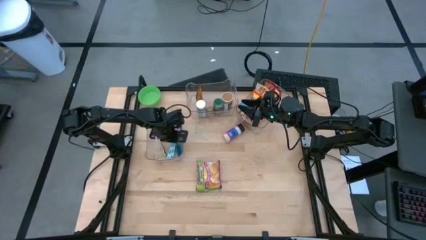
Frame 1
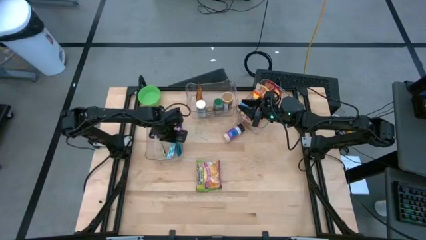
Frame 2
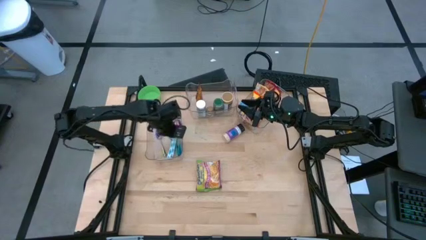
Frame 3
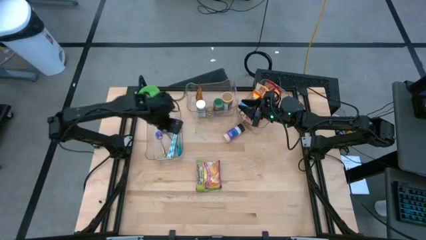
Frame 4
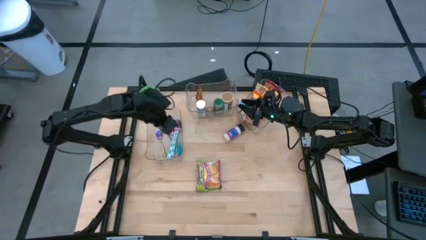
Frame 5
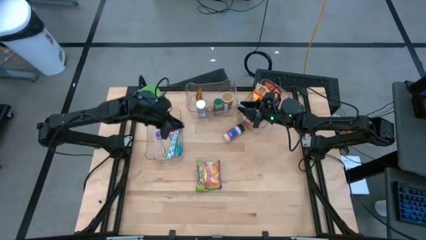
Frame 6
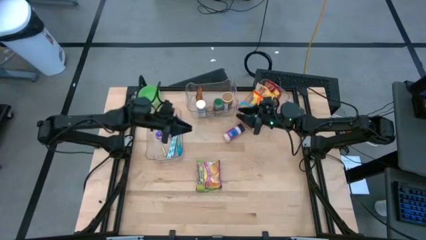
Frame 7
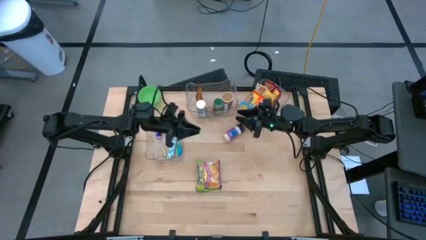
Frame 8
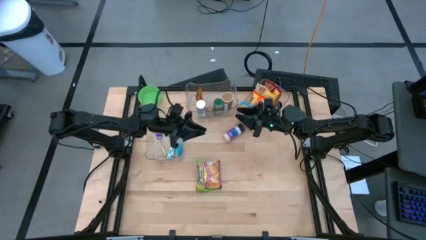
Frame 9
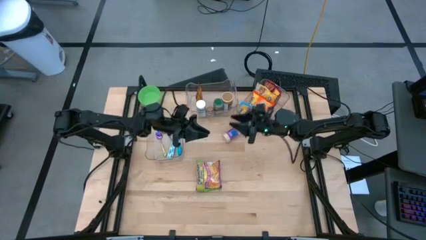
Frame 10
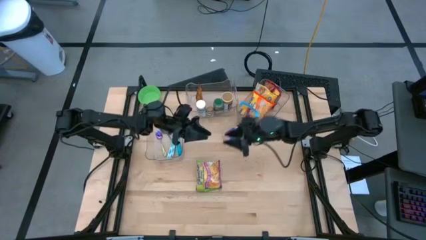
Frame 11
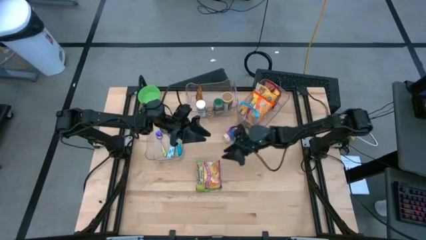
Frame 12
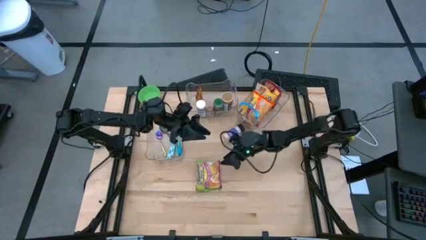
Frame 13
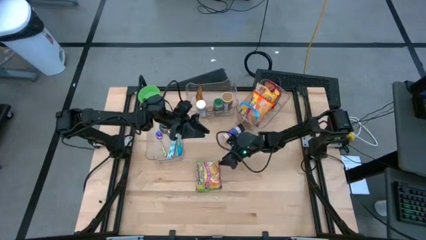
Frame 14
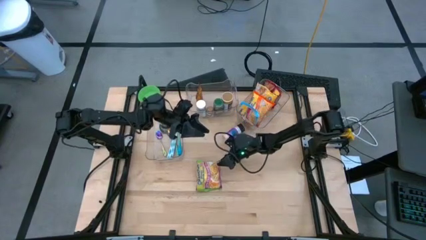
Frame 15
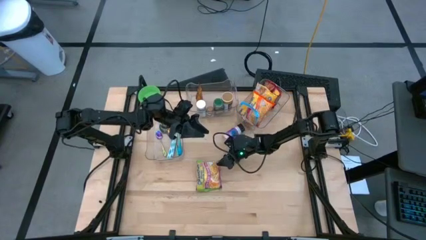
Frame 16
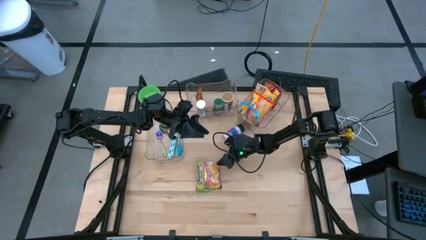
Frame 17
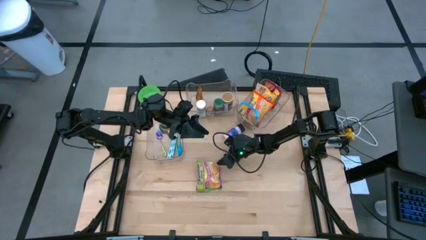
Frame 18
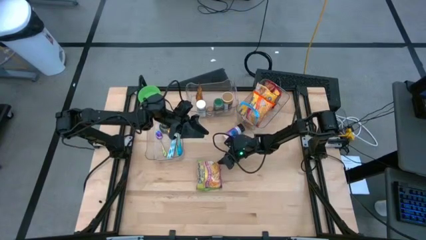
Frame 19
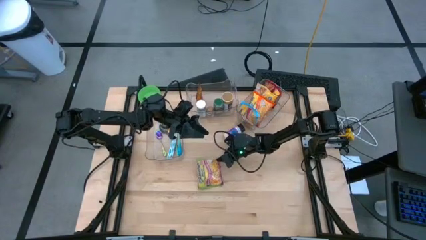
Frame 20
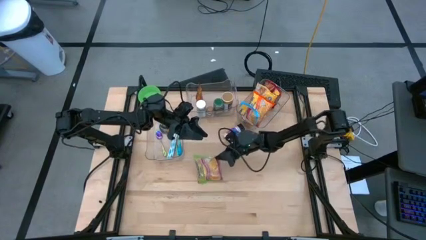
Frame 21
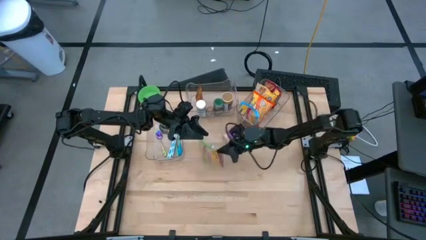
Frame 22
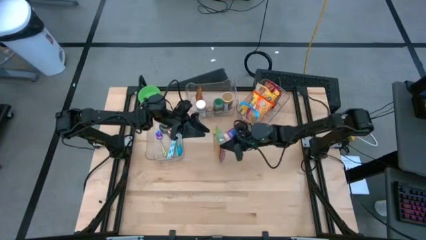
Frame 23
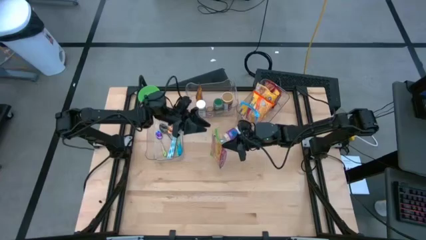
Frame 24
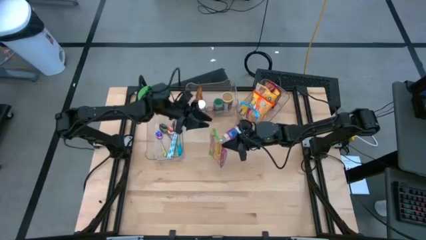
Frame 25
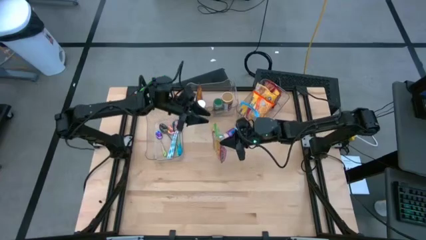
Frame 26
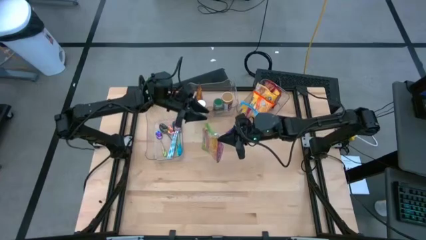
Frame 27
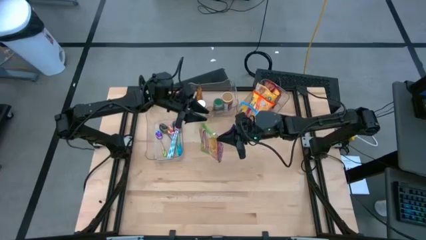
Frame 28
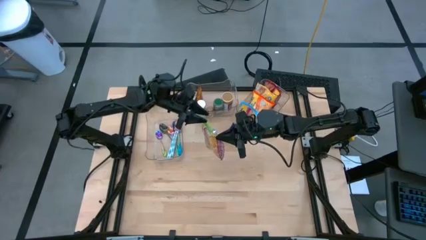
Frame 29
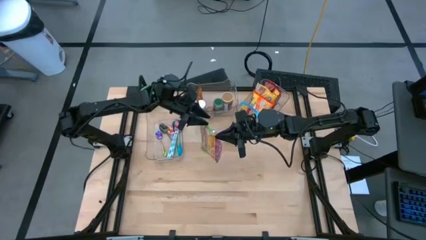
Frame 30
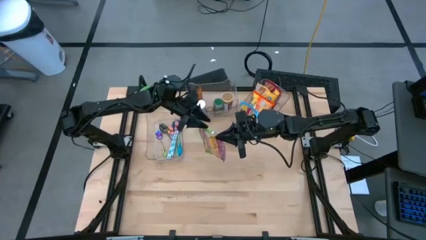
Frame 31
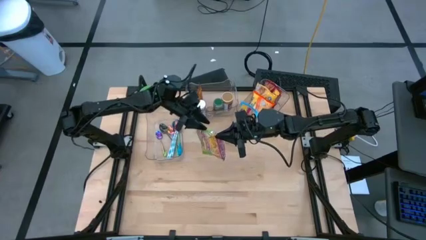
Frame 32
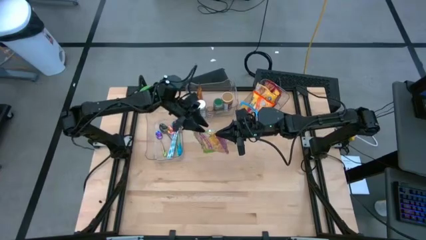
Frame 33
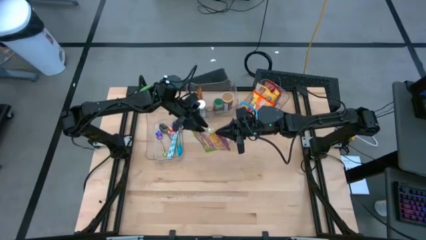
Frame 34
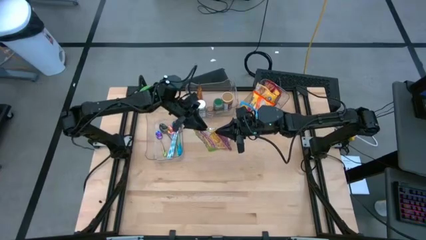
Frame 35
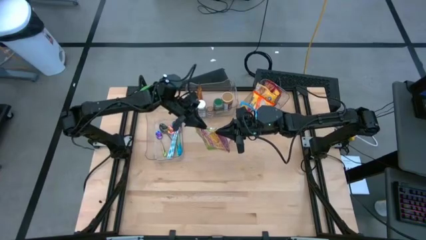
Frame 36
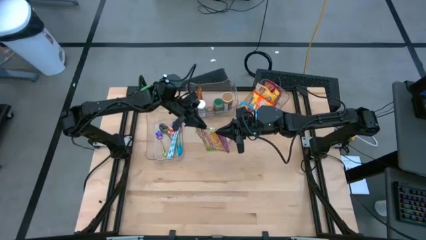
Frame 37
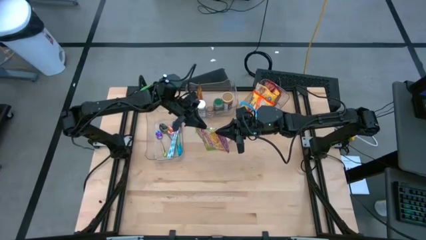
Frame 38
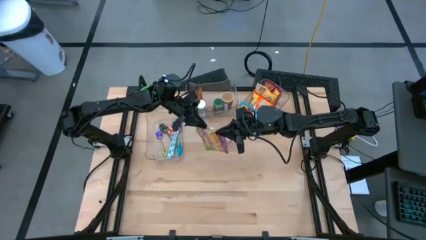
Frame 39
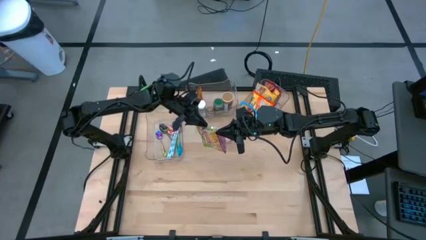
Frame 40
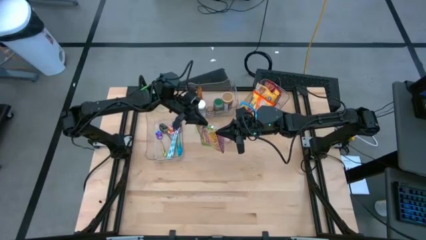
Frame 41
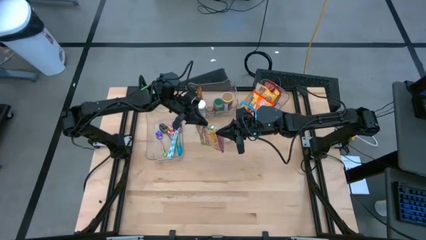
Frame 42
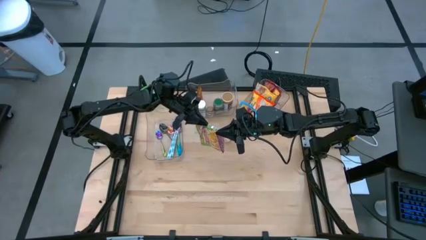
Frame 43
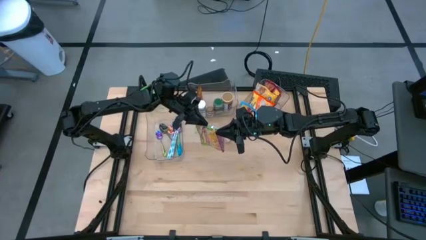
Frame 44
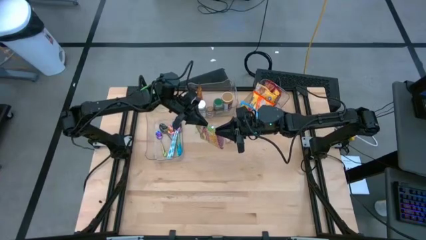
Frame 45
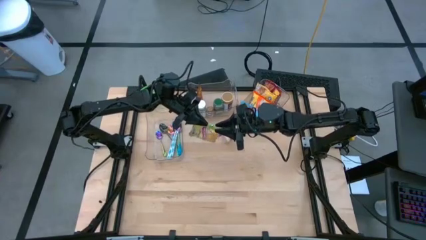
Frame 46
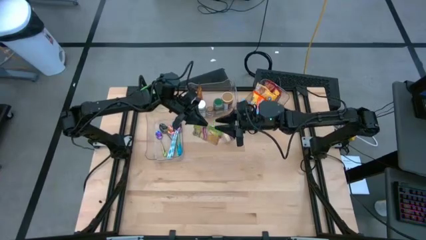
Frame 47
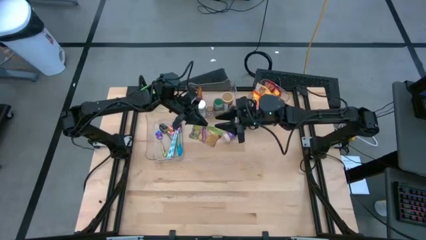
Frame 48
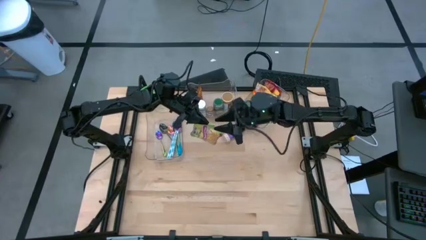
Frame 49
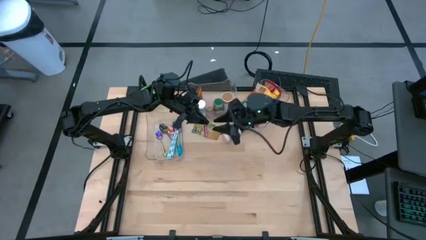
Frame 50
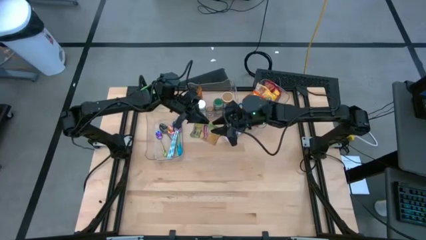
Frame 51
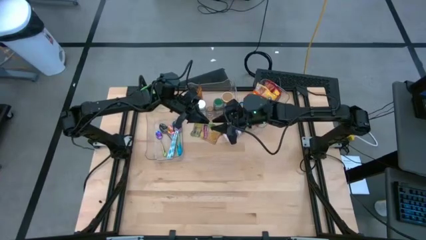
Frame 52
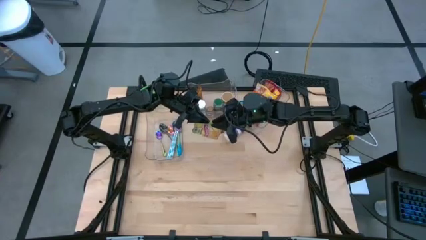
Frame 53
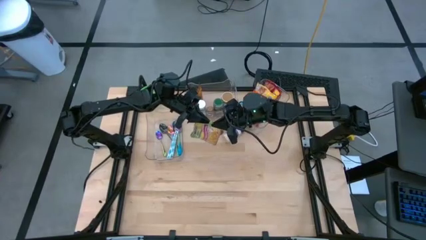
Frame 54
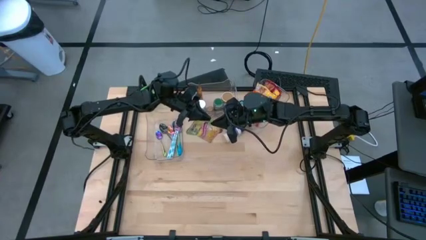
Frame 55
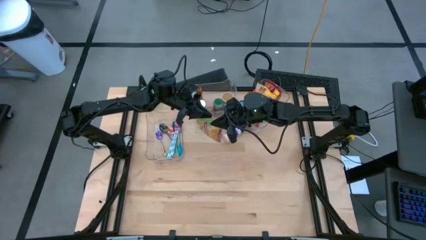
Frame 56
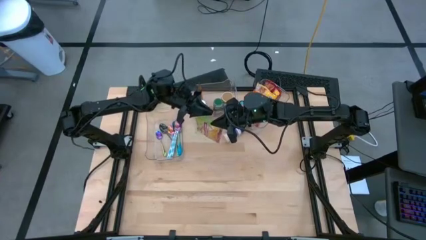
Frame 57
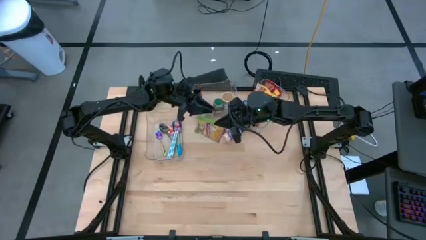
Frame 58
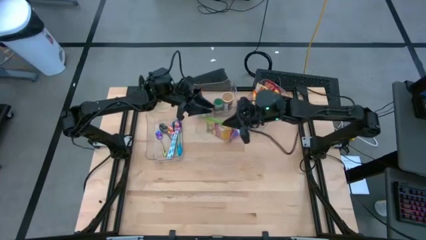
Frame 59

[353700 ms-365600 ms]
Task: Pick & Place Food Item
Put the green noodle pack into the right transparent bin

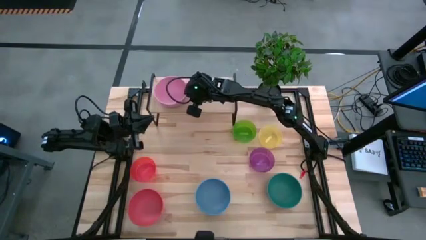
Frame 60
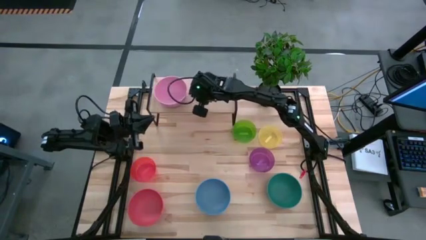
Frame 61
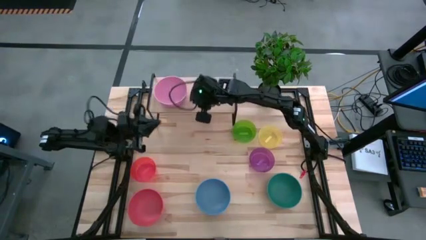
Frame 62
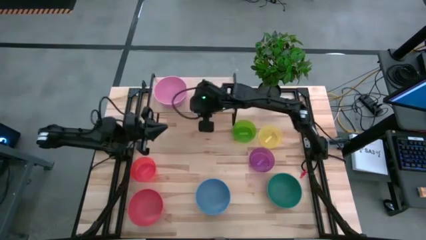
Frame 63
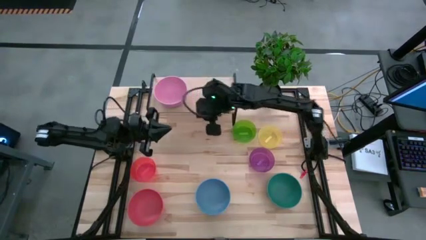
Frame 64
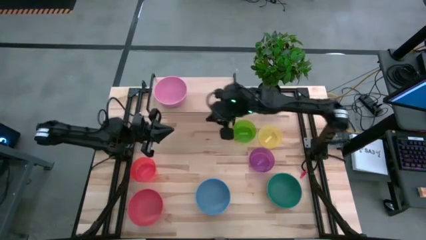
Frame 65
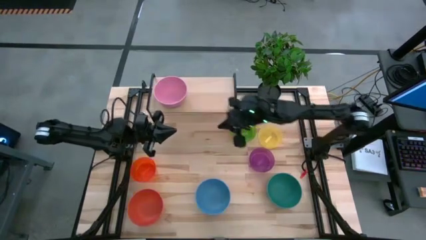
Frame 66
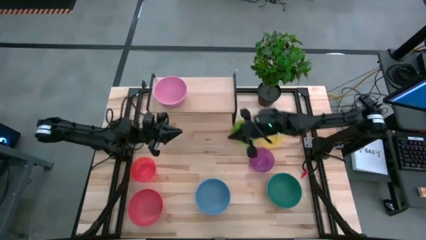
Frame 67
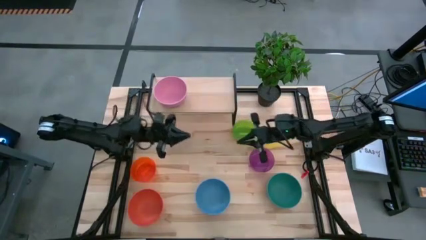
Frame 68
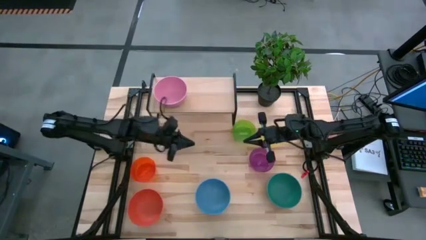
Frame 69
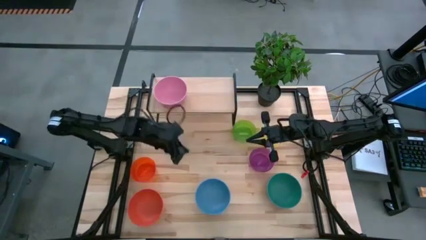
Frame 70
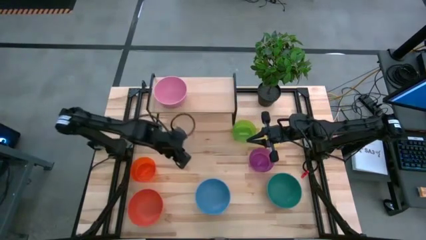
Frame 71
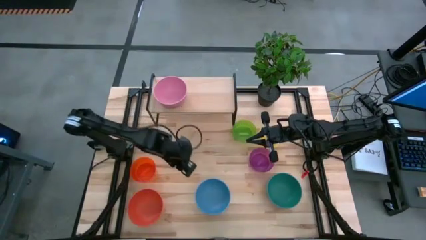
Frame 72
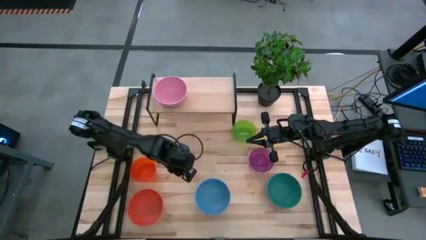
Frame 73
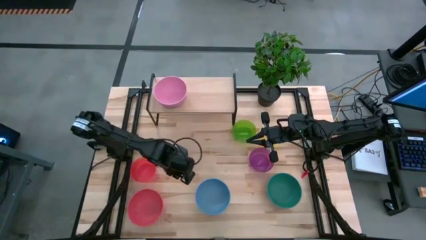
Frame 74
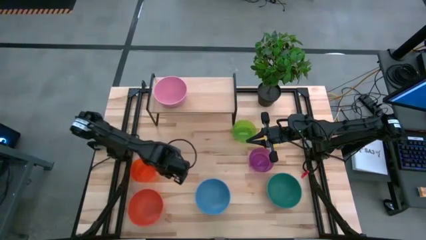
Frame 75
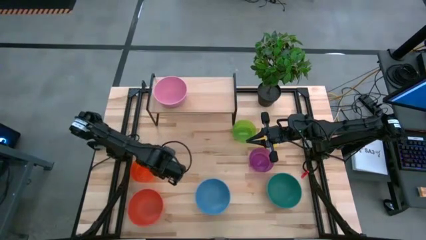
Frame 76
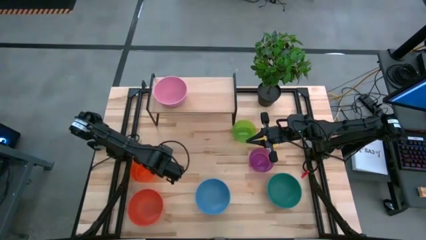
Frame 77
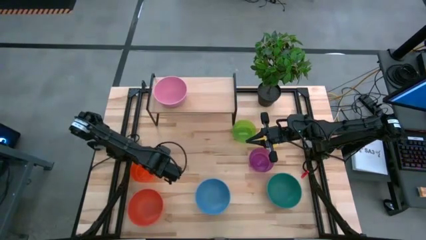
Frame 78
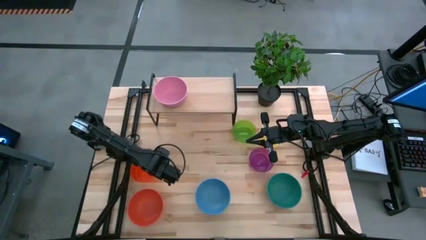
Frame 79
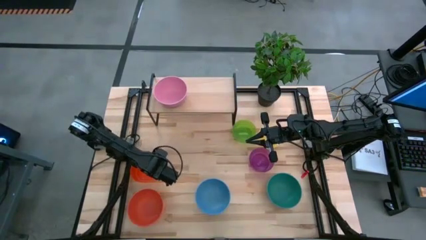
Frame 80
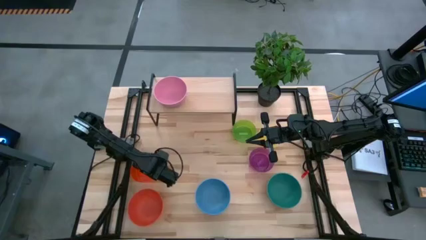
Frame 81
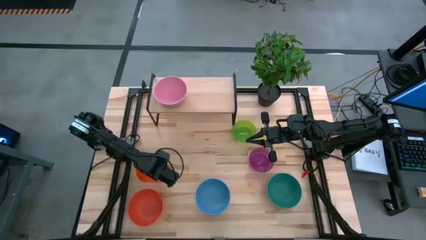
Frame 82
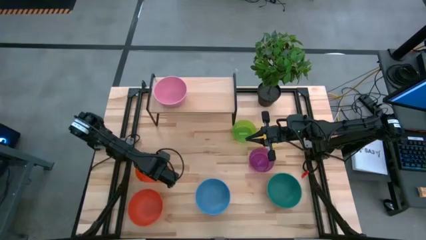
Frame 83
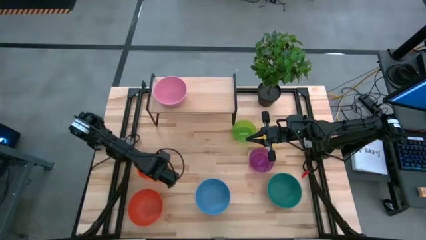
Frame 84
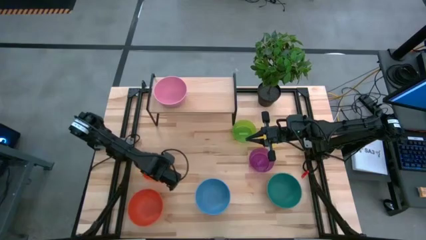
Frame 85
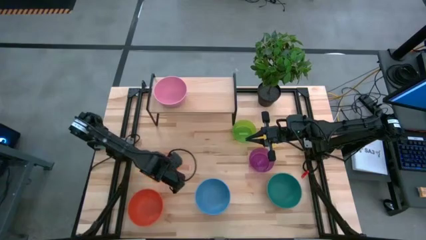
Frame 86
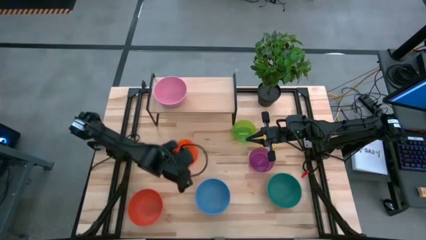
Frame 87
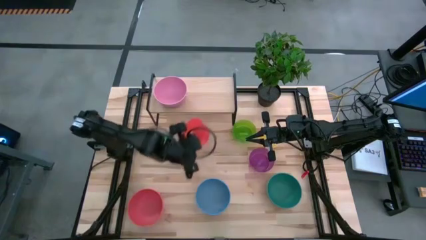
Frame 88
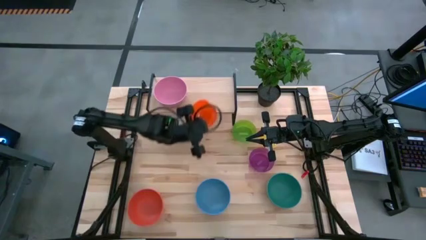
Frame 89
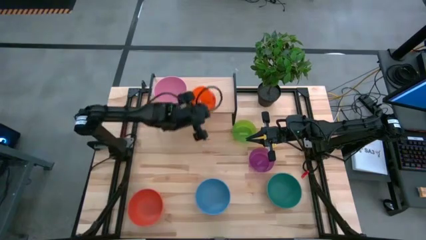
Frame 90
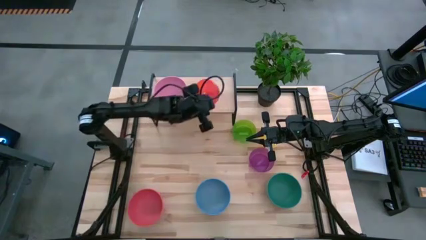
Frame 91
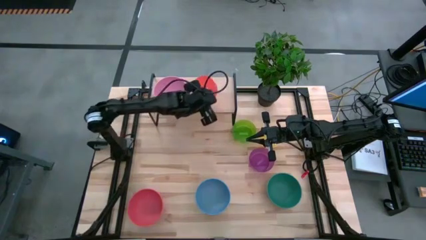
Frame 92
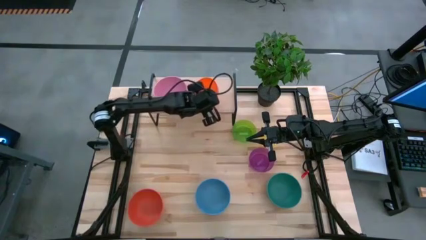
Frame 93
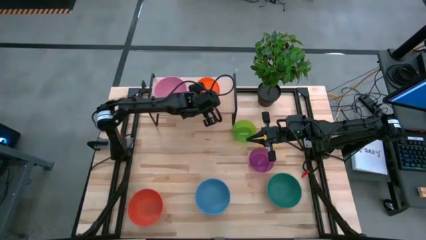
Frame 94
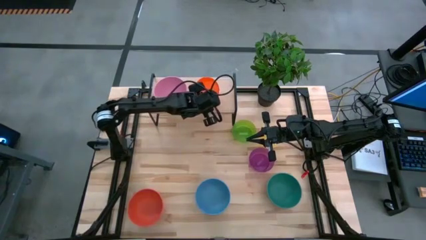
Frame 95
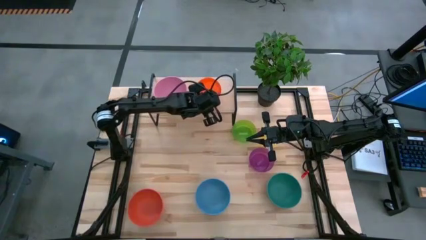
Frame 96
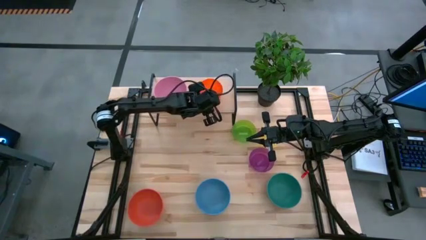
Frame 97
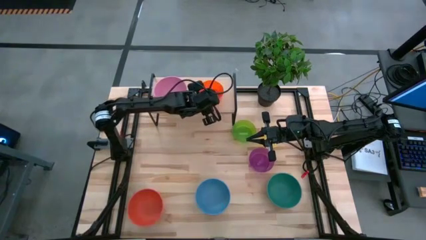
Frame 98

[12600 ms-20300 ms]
Task: Place and stack bowls onto a shelf
Put the small orange bowl on the shelf
